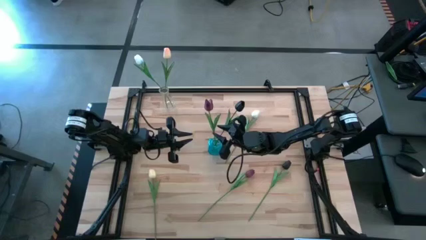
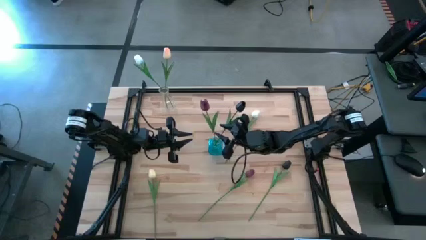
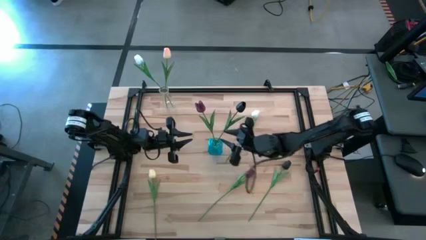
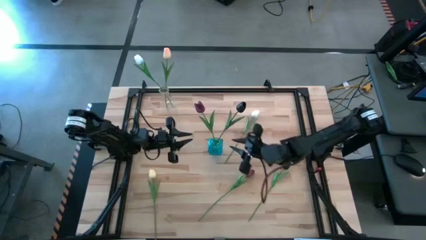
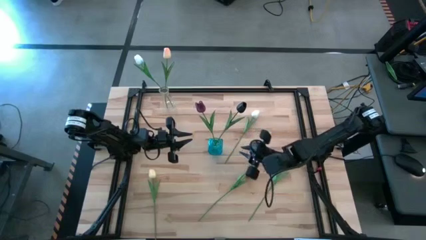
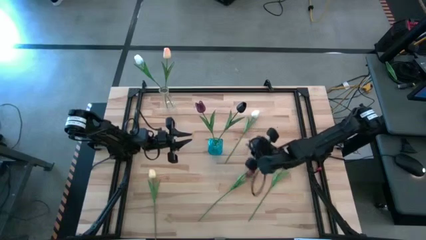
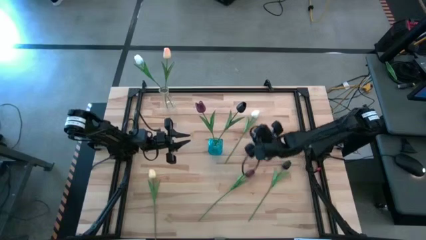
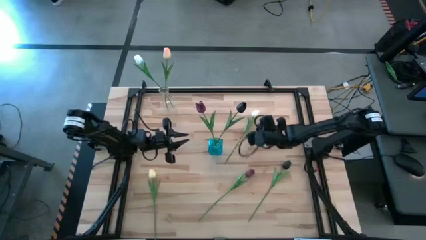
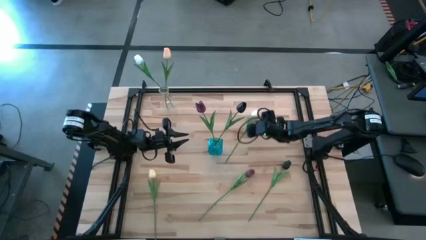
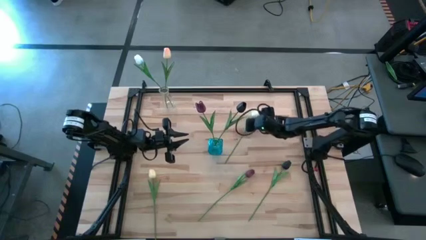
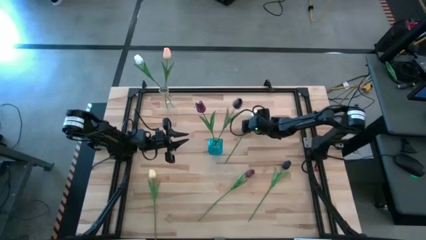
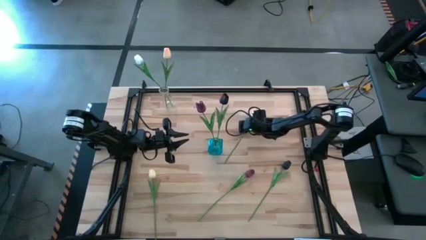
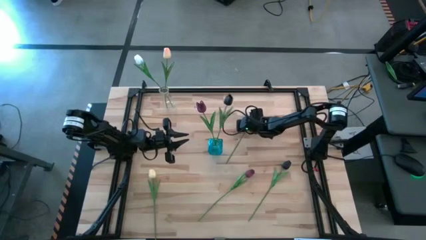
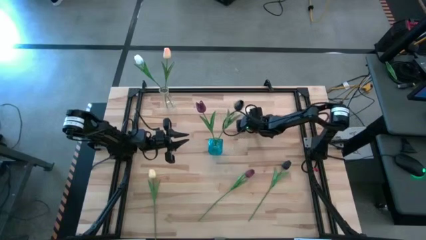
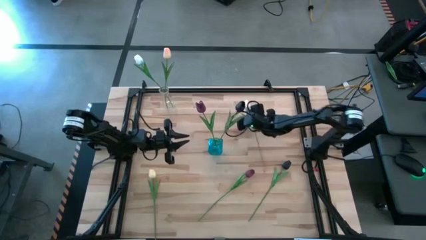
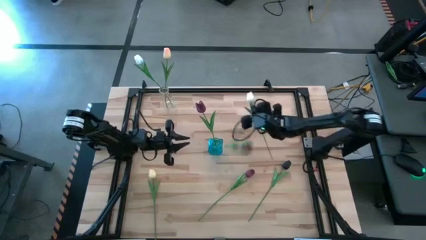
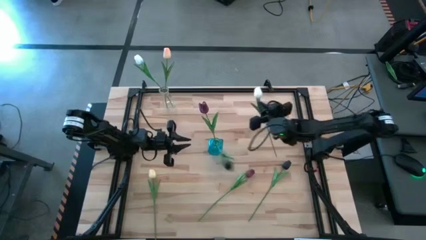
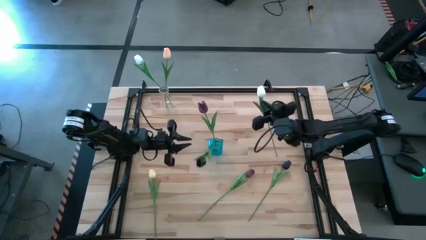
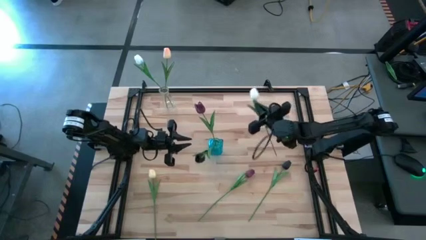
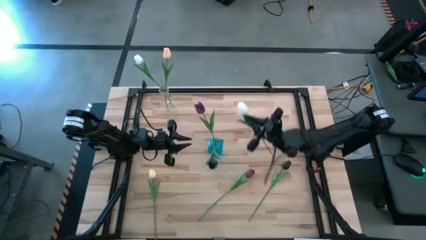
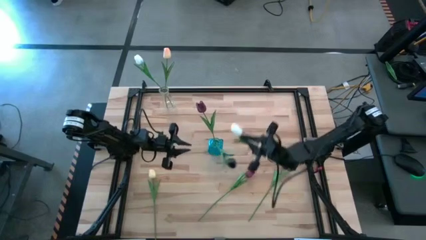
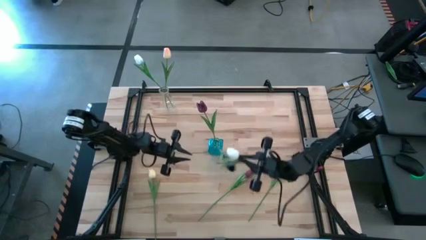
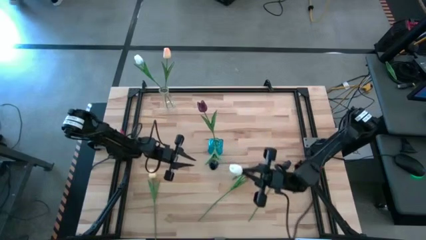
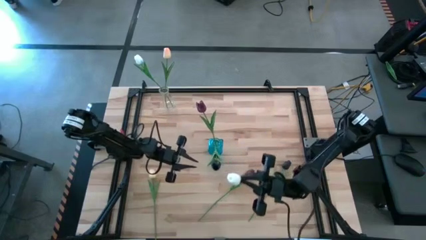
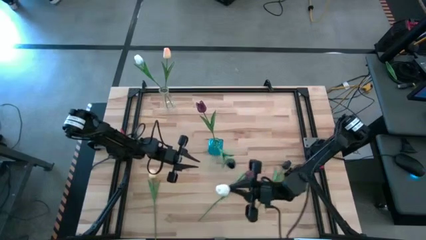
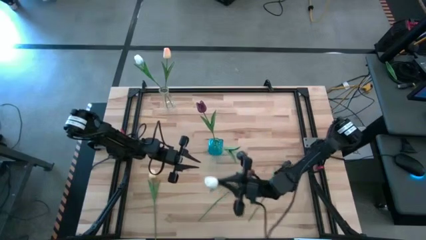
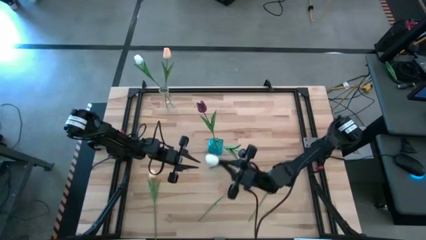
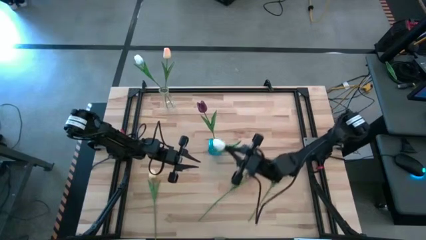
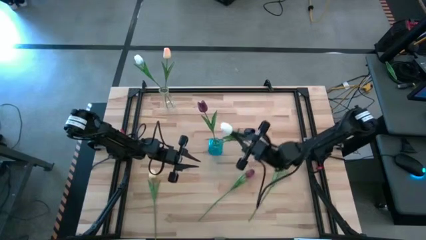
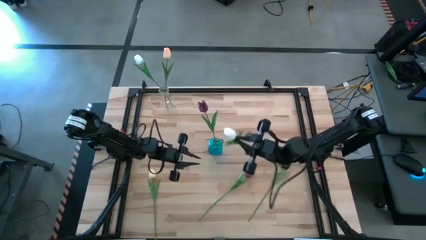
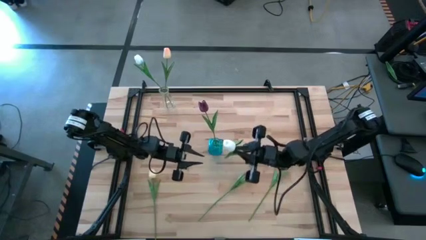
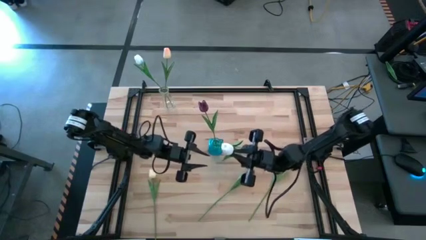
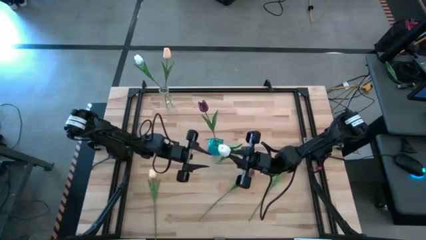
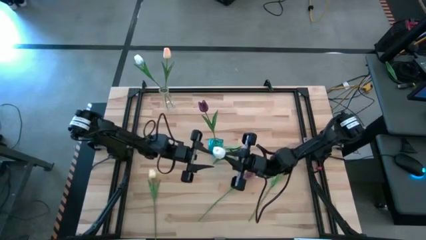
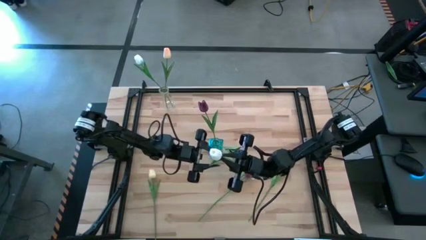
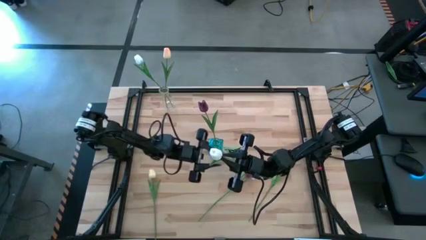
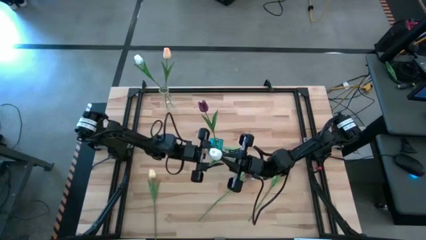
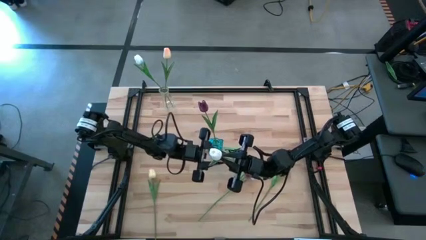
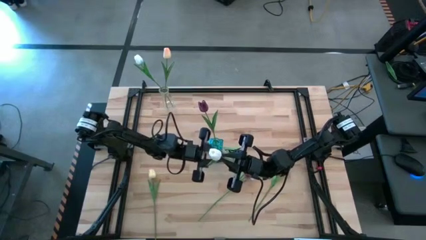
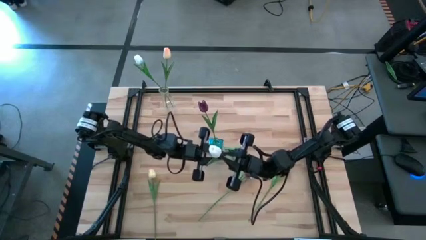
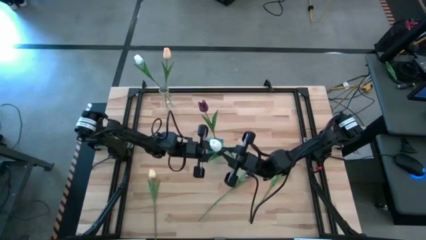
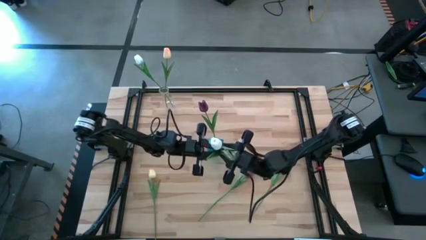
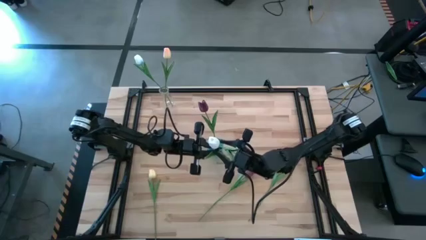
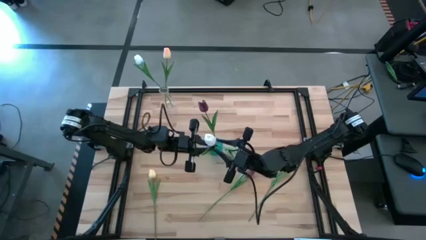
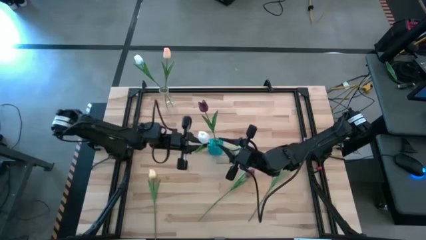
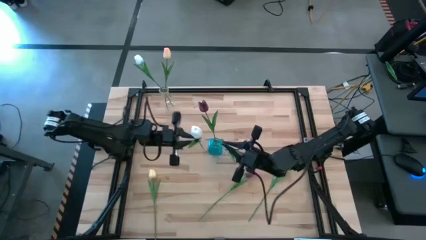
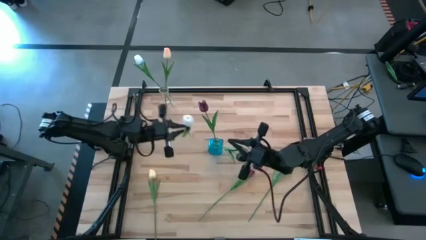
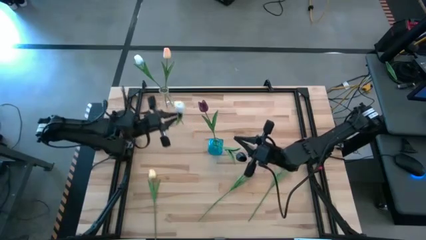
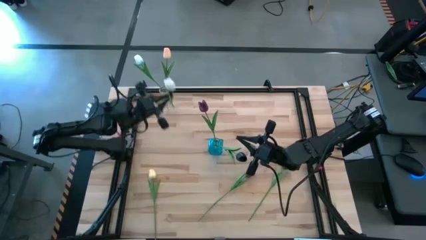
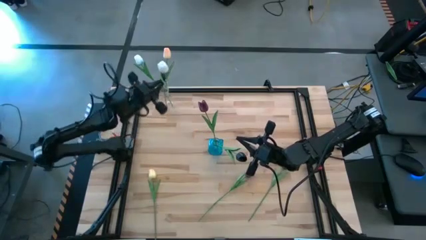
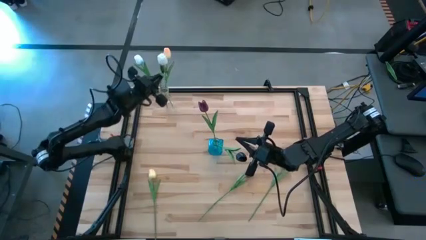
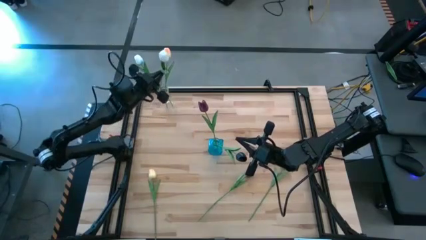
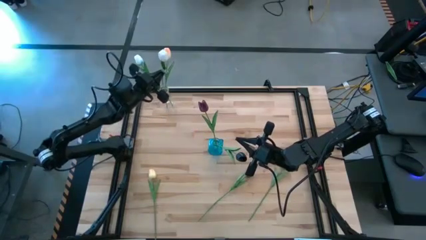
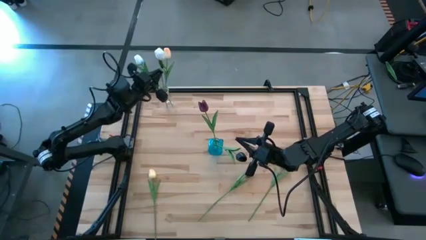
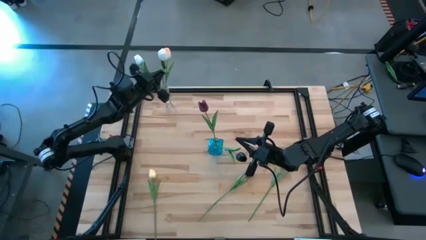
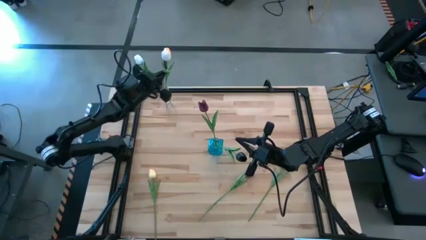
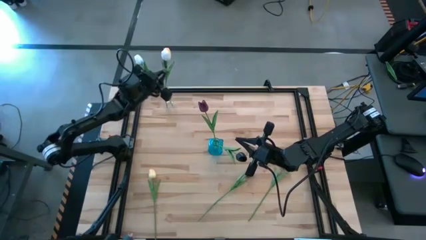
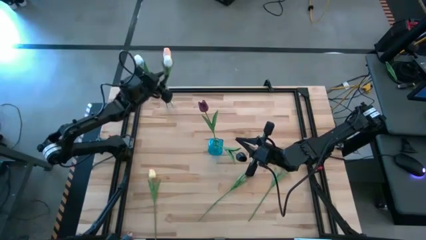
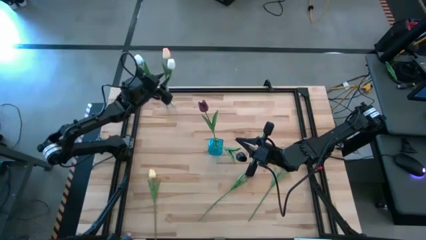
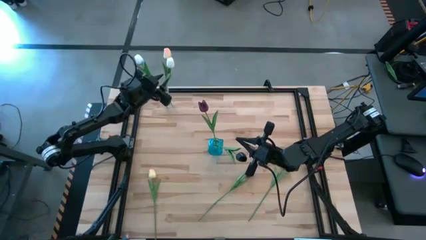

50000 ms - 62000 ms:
Task: Sort flowers into vase by color
Put the white flower into the transparent vase

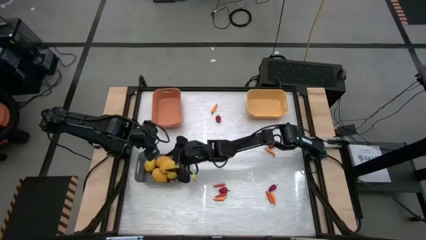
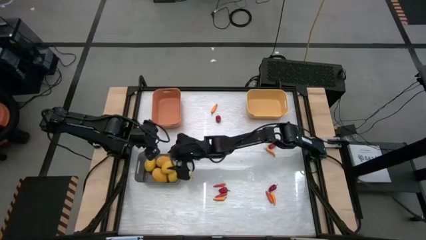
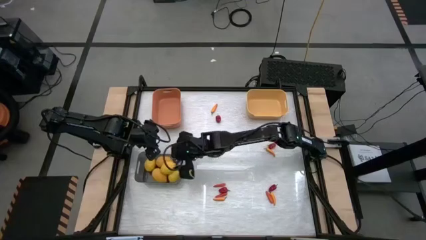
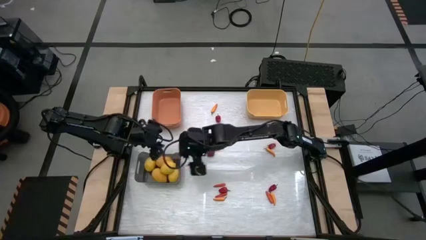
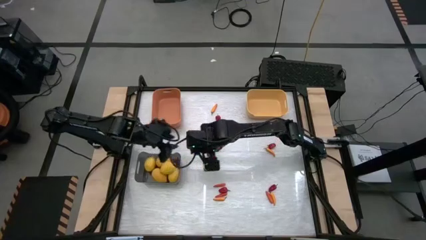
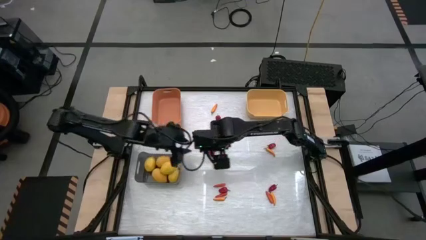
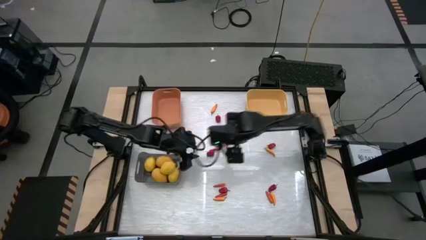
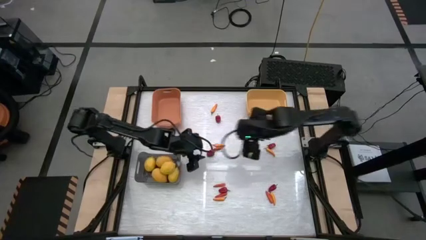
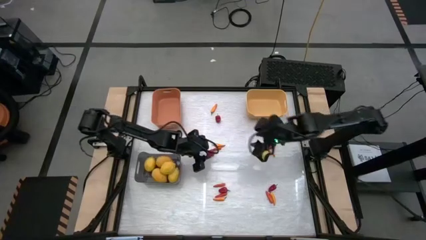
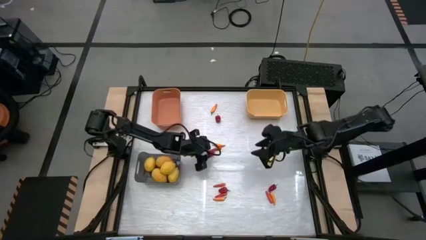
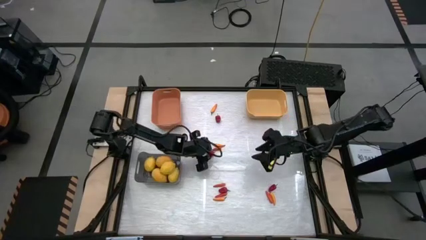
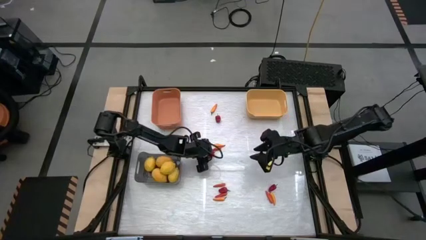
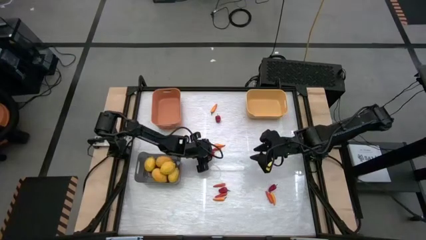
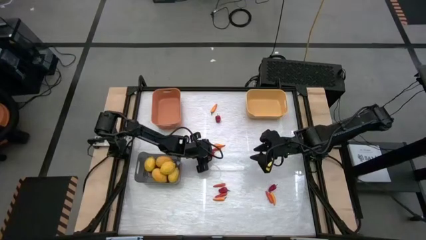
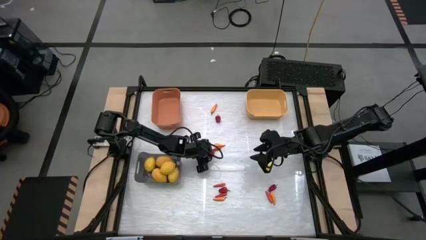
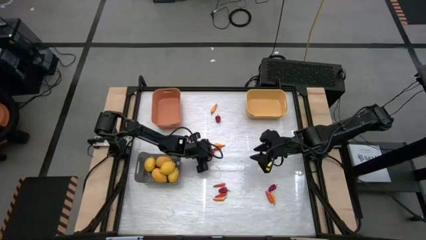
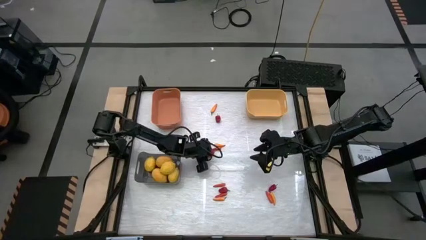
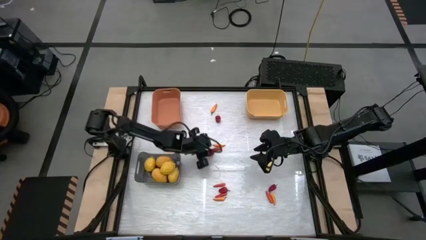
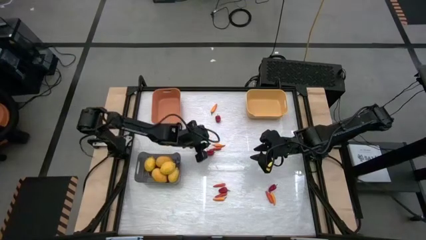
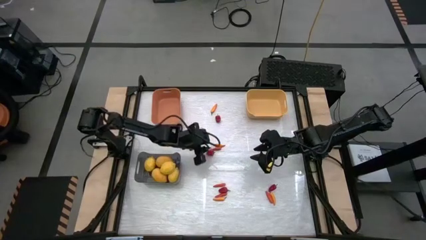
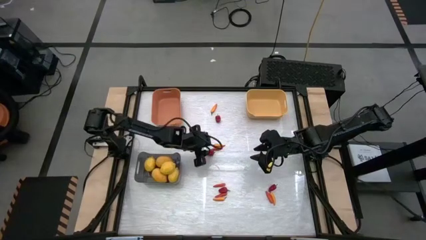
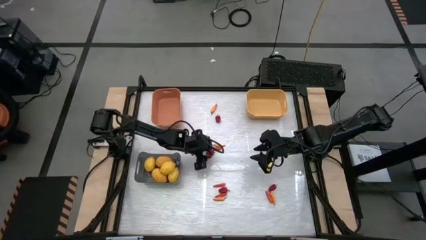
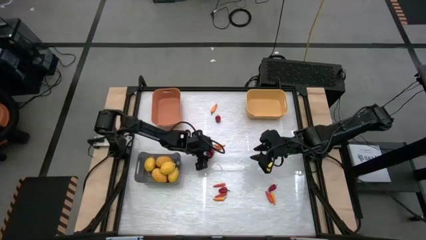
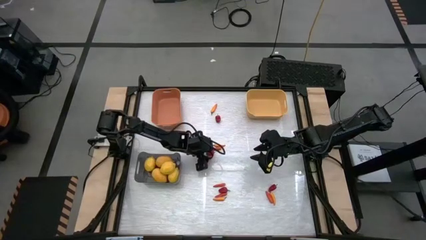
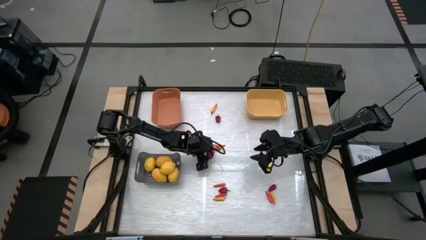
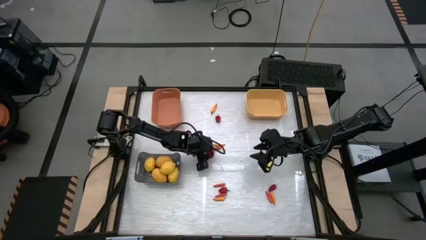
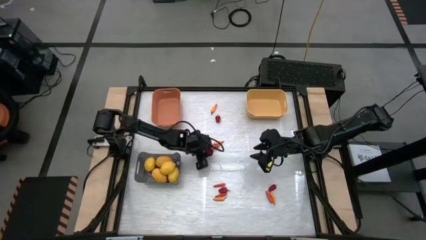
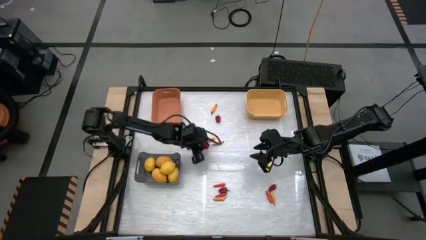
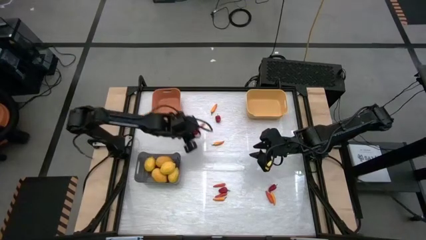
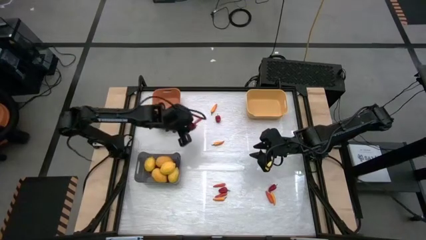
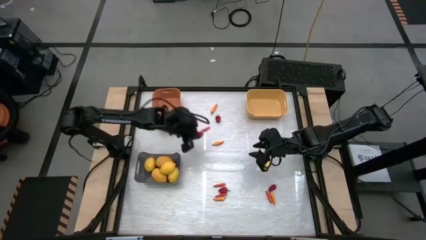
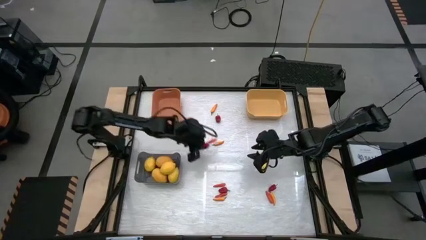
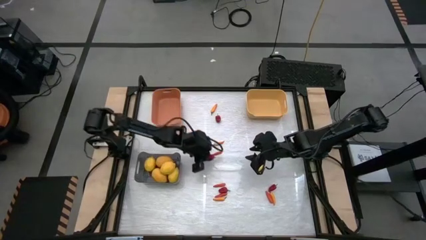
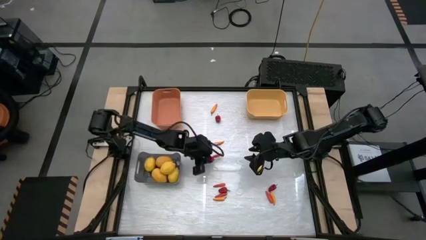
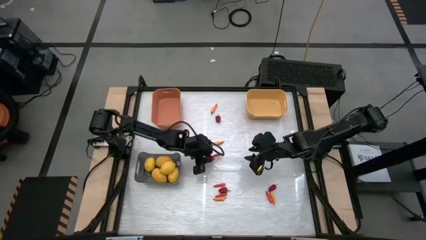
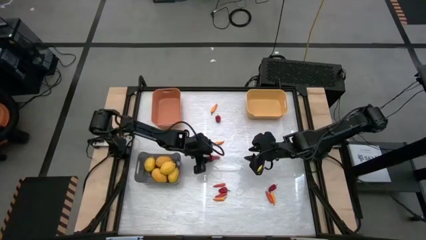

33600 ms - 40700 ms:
Task: Sort produce into baskets
Put the red bell pepper into the orange bin
